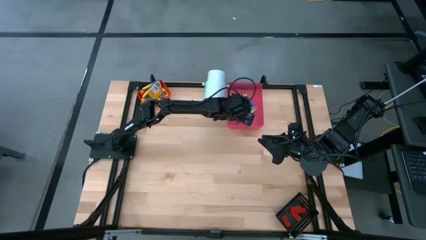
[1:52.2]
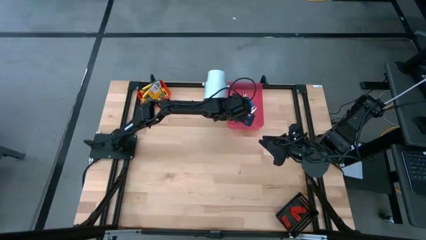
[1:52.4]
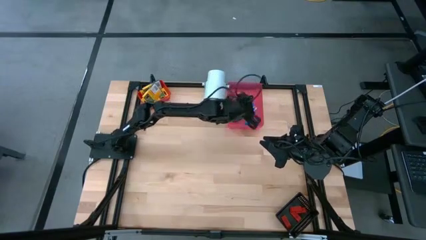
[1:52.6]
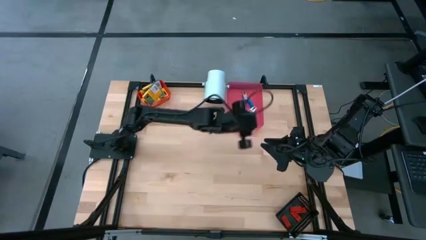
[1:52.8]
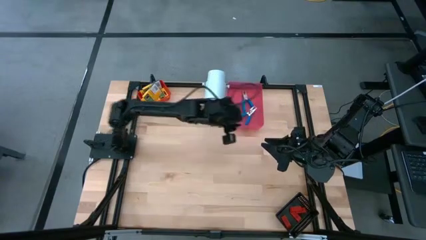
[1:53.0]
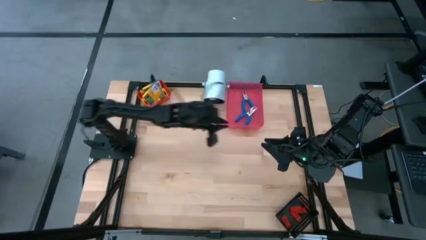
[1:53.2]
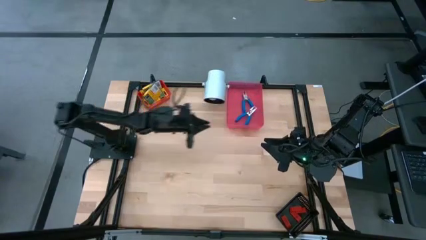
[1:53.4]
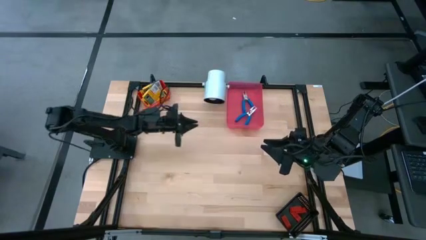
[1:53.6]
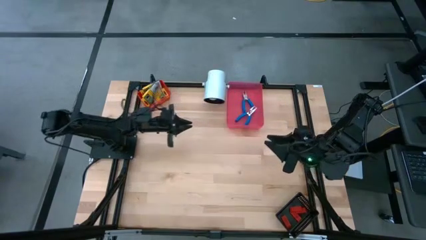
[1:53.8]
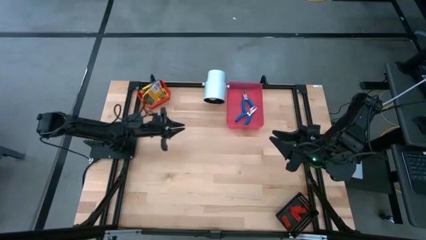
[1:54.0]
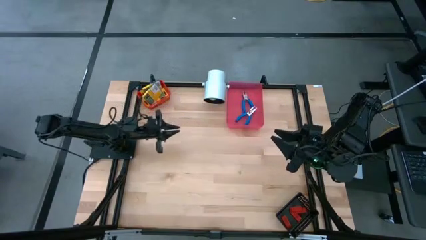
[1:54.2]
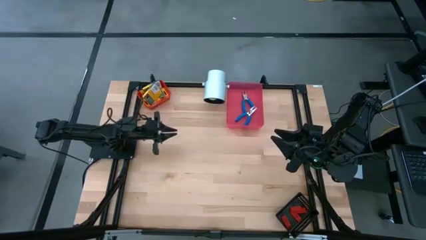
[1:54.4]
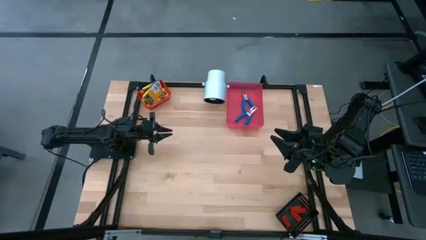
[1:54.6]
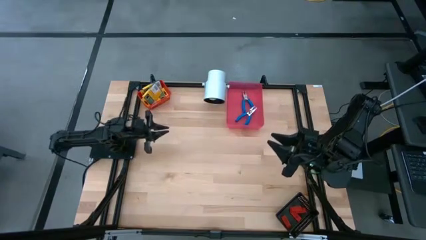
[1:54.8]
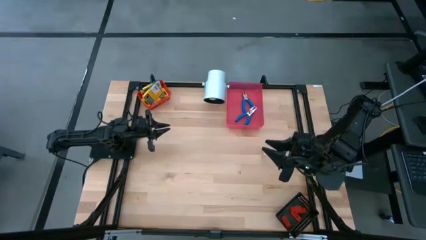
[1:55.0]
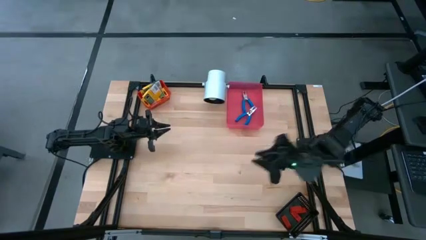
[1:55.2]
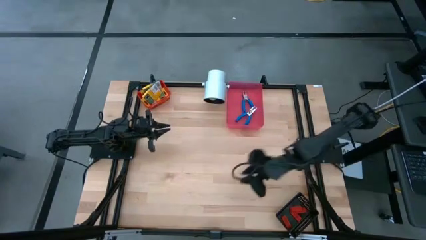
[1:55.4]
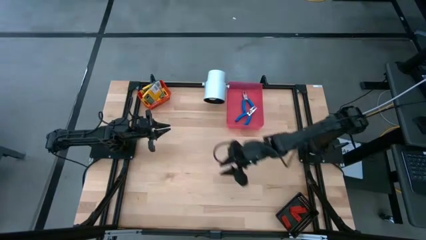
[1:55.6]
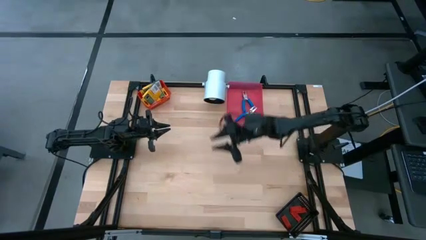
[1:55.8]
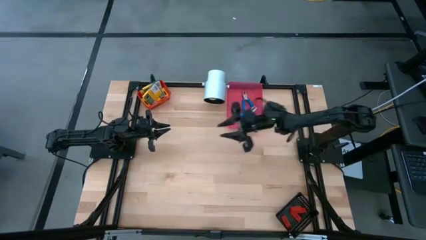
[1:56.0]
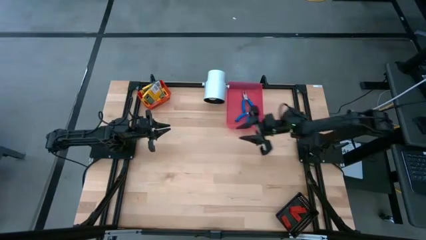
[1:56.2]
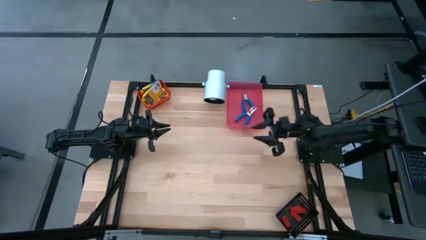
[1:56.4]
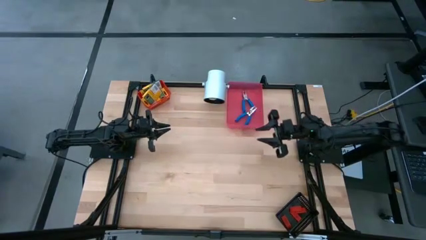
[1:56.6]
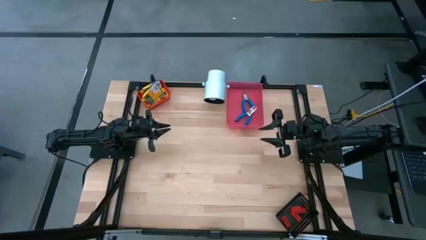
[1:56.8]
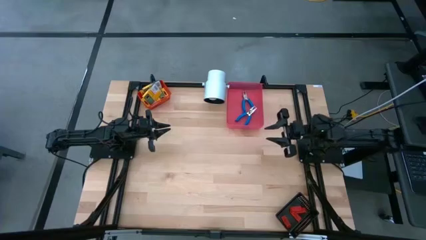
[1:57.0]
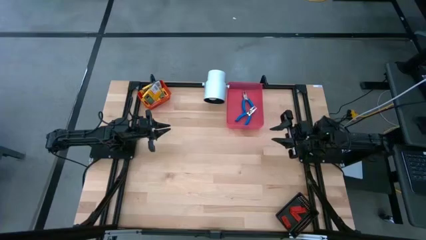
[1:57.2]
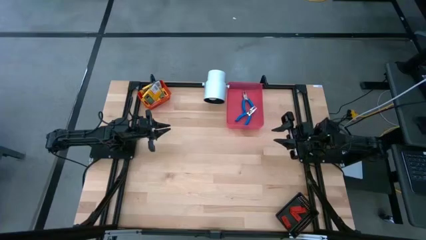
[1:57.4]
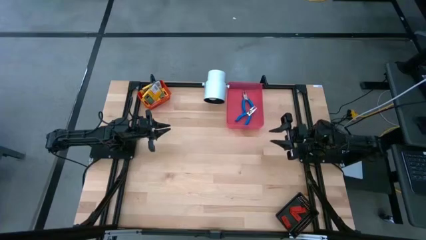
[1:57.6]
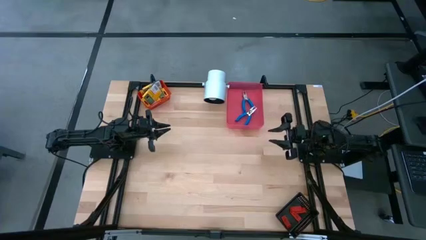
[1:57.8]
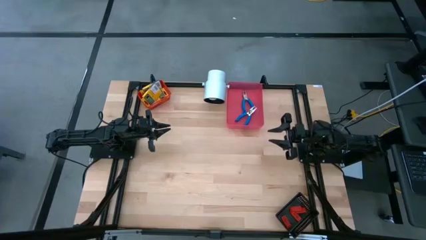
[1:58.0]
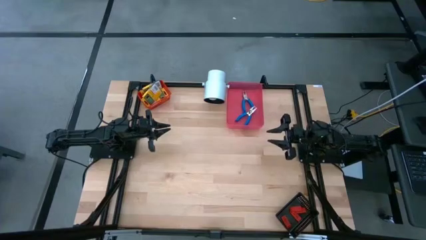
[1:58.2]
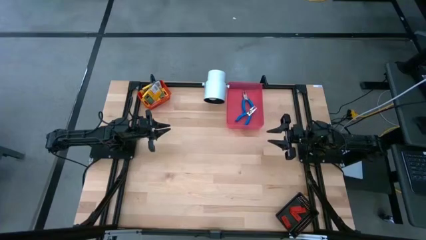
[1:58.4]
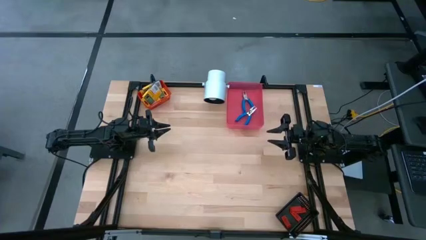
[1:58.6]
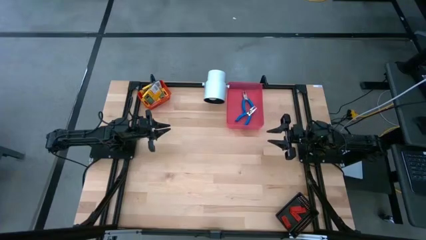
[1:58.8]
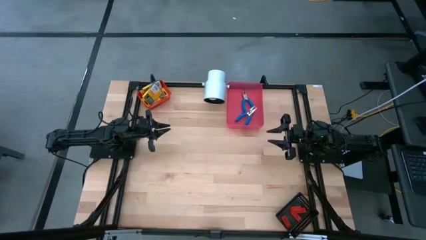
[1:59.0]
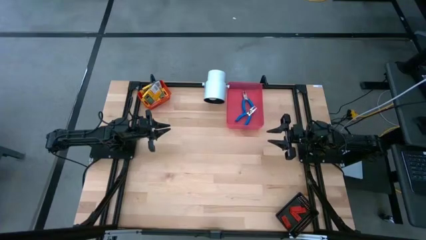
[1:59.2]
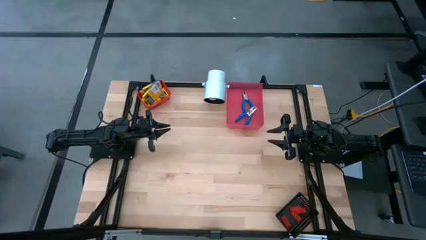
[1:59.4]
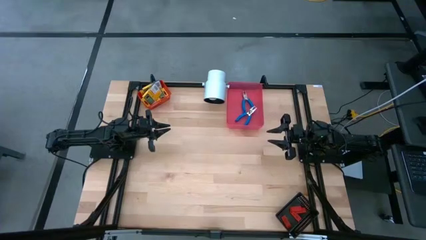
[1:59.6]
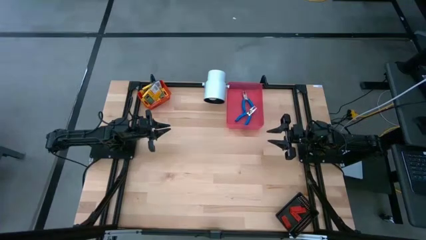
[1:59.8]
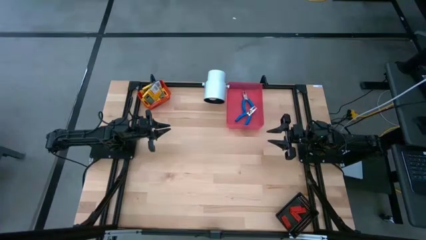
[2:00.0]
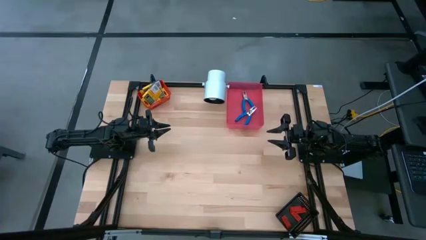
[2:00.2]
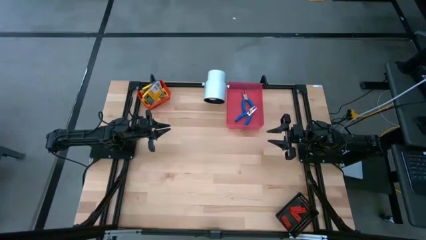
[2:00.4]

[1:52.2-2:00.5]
Task: Pick & Place School Supplies
Return to Home Position

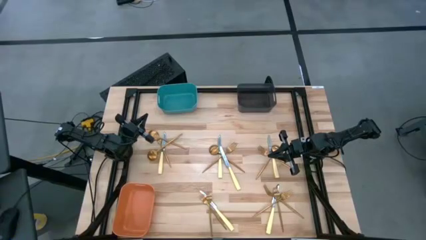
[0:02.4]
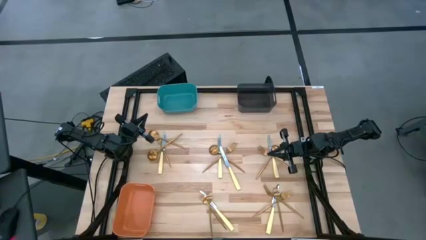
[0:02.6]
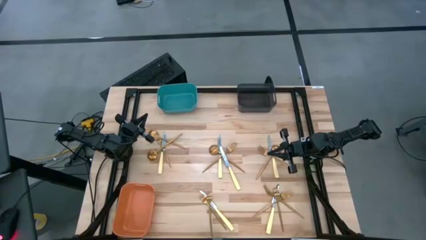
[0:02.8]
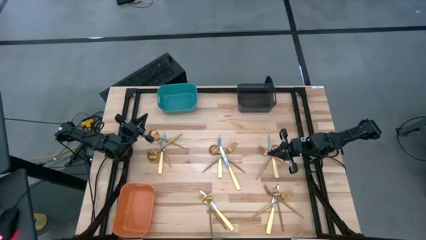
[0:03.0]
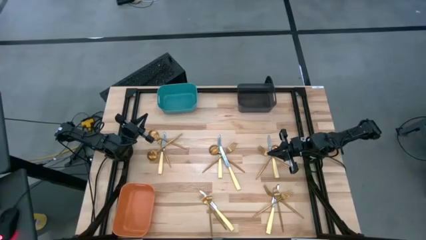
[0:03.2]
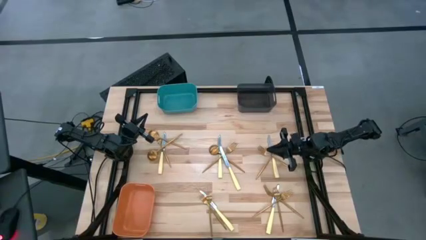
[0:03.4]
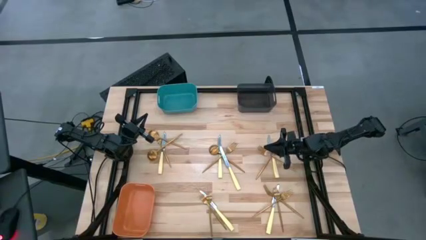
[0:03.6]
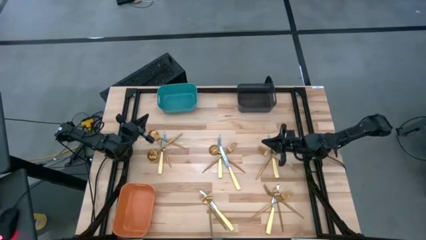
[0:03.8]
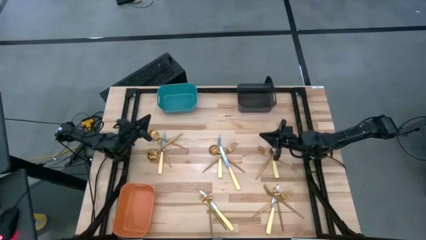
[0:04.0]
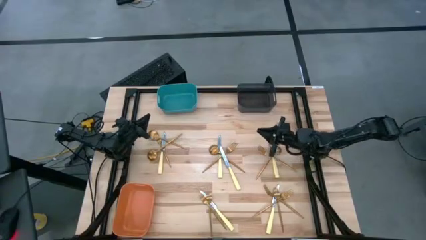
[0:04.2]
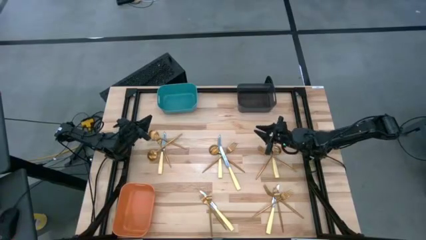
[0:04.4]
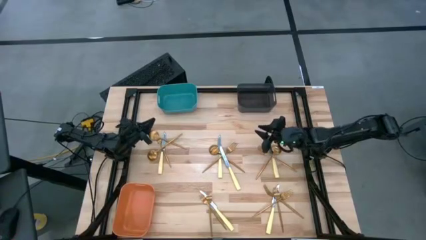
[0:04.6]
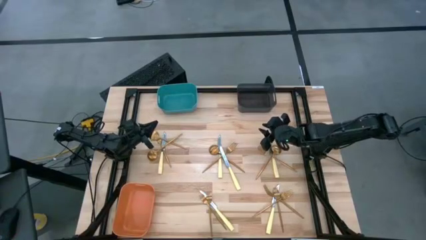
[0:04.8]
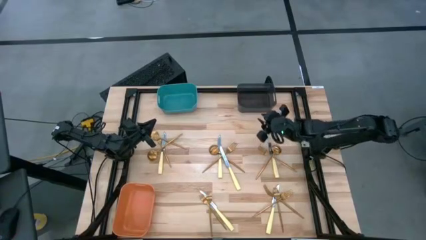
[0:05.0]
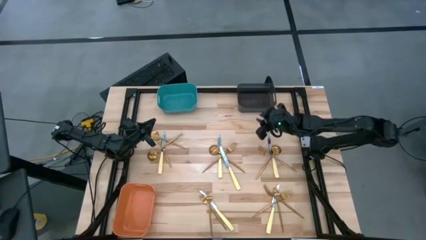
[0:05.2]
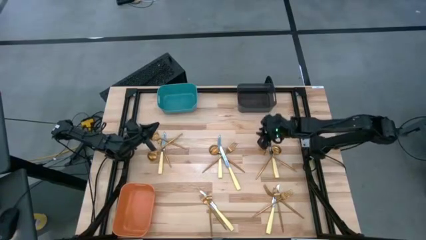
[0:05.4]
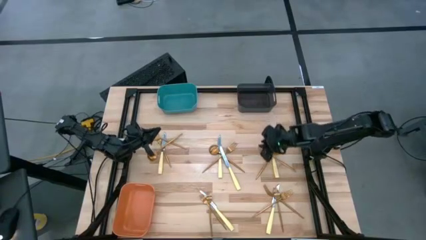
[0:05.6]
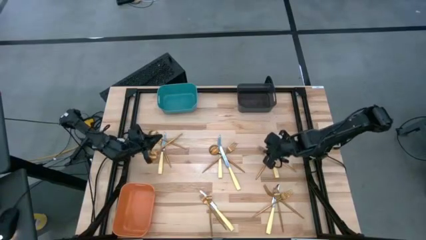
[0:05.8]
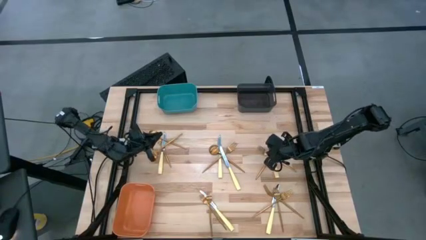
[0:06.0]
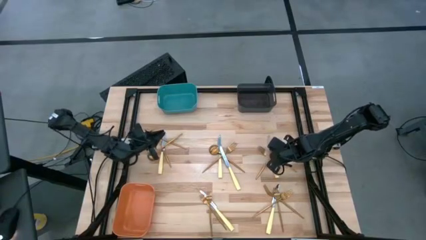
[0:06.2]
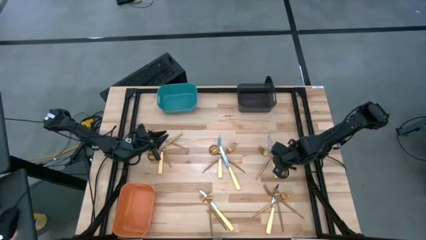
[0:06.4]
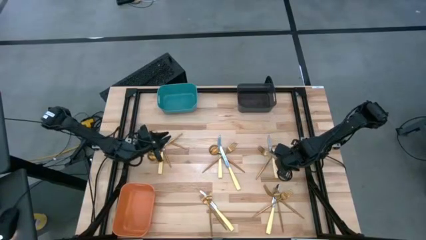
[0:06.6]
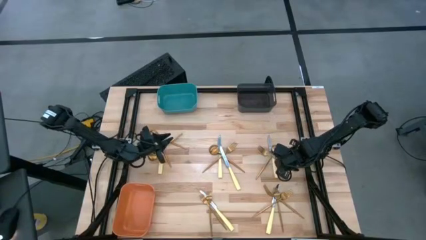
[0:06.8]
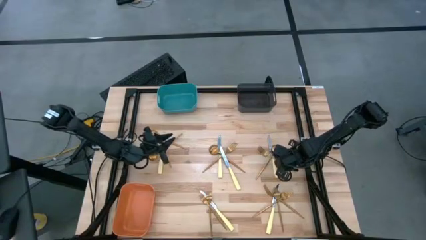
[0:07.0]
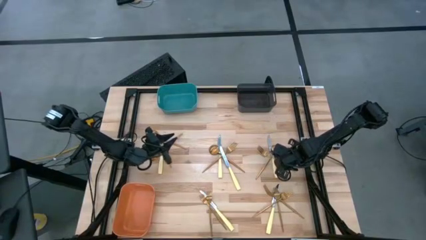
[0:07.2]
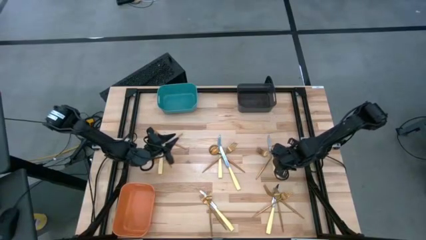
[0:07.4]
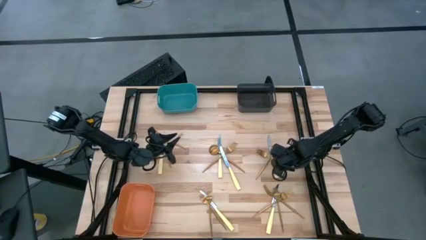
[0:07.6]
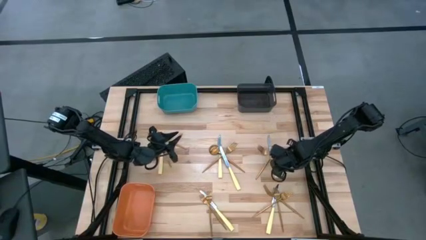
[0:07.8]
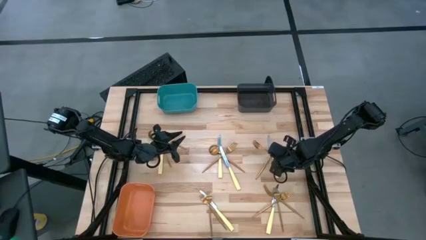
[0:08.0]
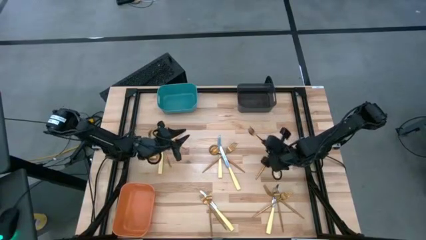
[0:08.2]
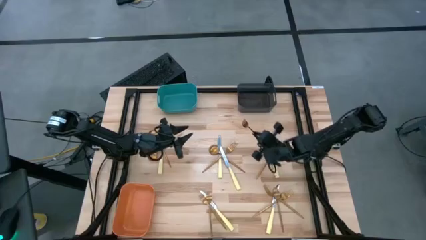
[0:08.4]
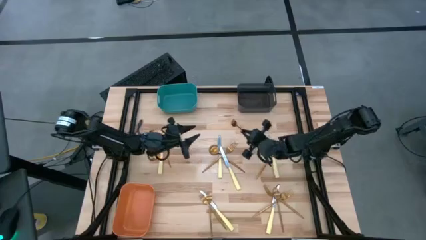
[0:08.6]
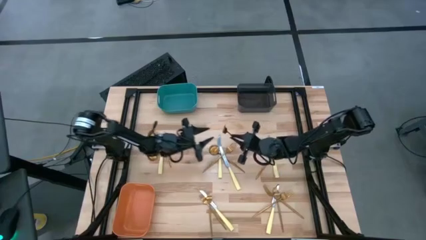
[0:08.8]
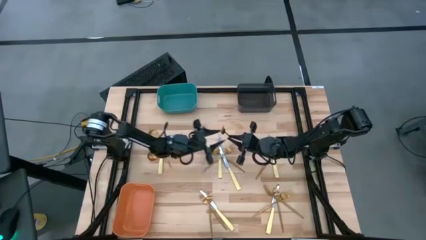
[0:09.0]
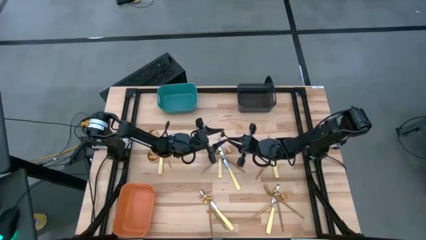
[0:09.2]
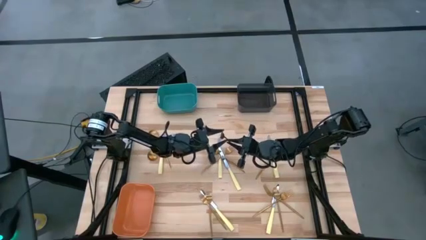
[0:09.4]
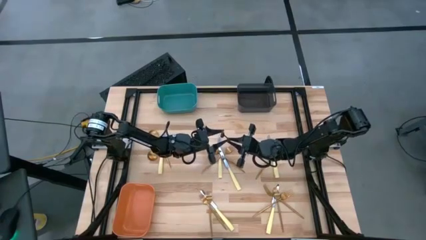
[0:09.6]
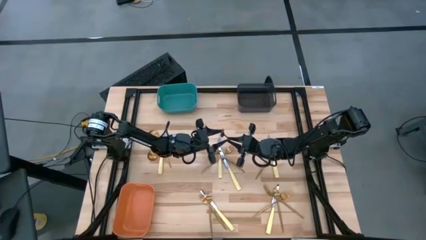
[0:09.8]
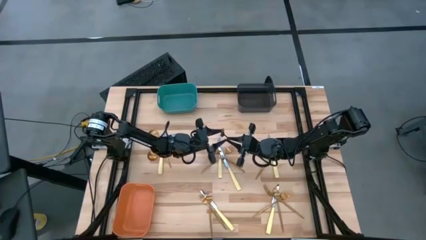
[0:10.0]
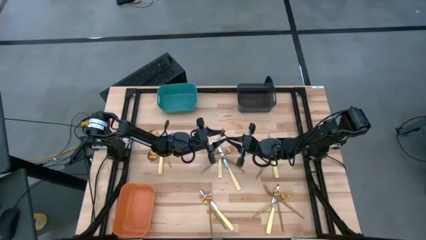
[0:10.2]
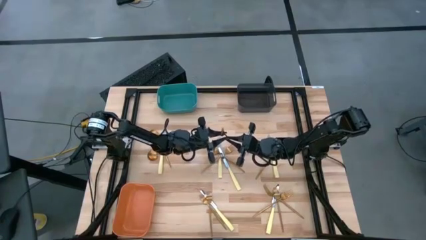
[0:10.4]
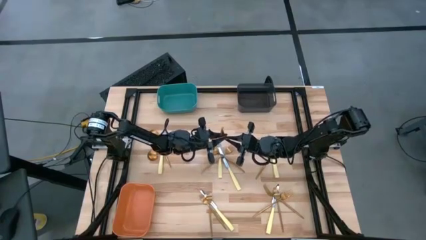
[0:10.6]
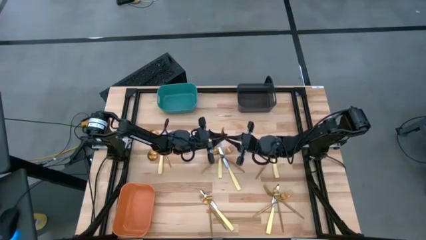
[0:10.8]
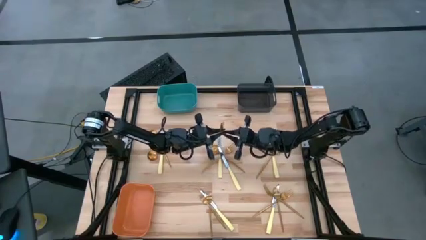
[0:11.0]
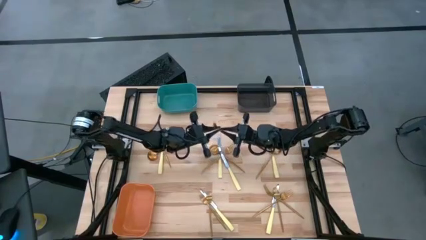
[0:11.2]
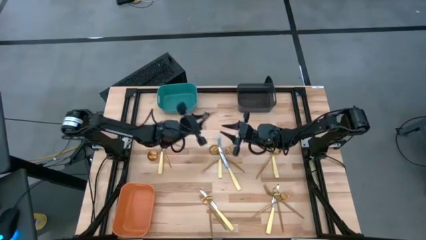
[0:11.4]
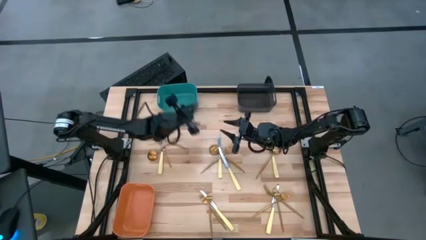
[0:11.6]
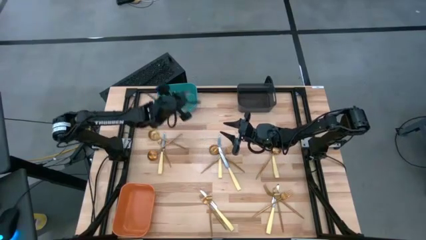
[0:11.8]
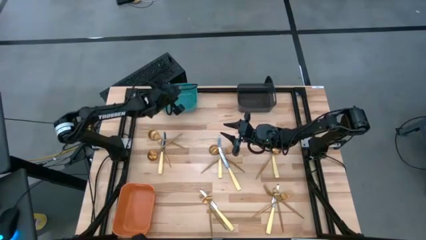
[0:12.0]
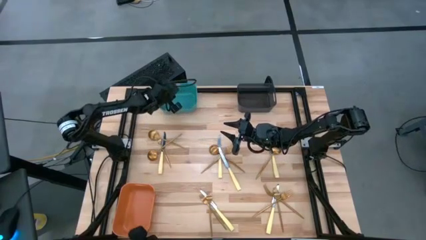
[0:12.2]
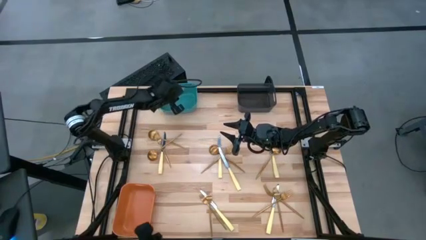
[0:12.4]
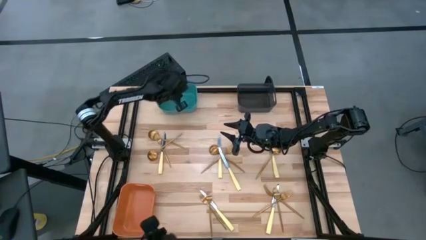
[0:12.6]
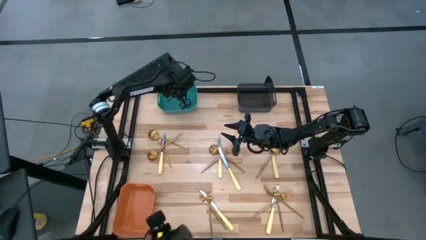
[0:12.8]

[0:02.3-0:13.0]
Task: Sort silverware by color (type)
Put the gold fork into the green bin
